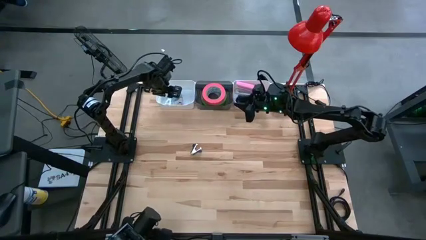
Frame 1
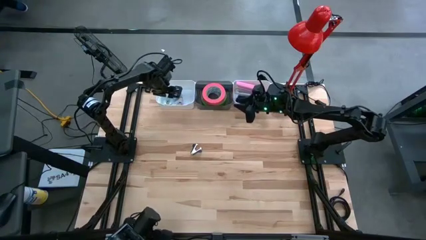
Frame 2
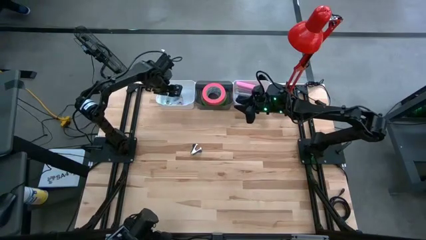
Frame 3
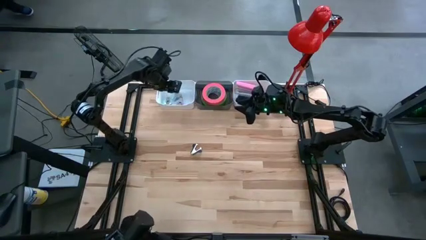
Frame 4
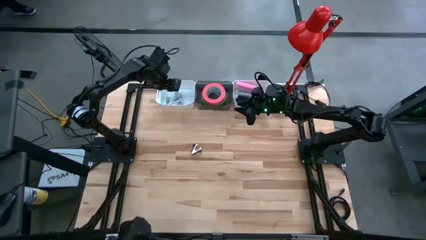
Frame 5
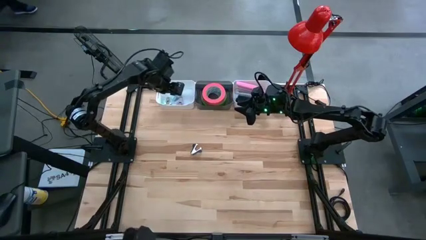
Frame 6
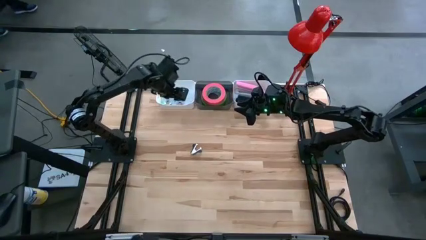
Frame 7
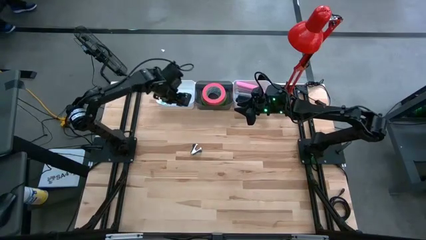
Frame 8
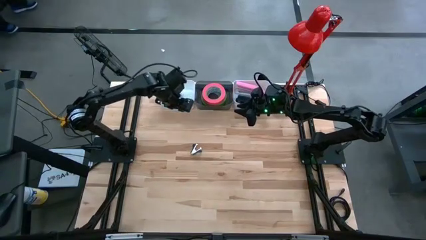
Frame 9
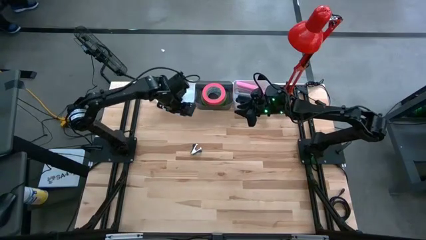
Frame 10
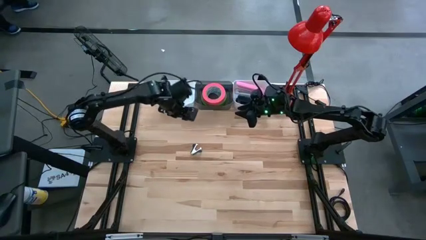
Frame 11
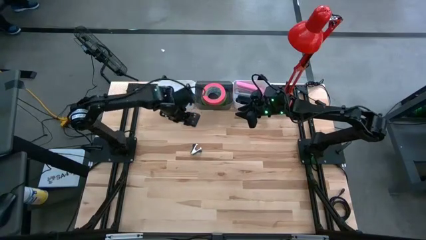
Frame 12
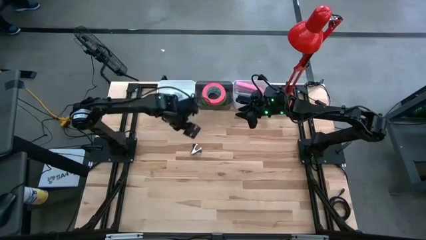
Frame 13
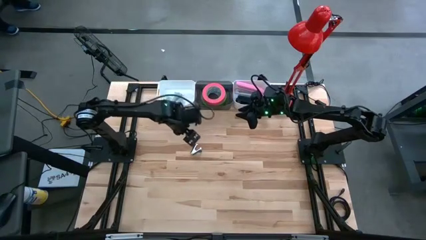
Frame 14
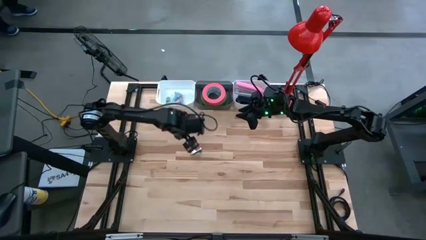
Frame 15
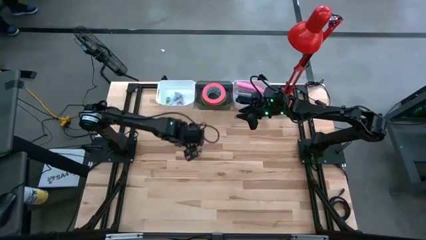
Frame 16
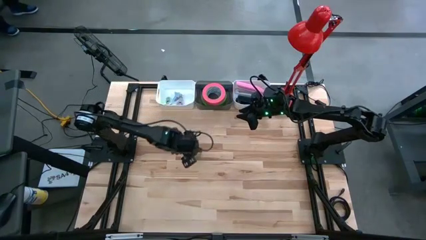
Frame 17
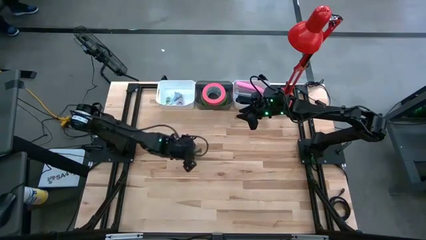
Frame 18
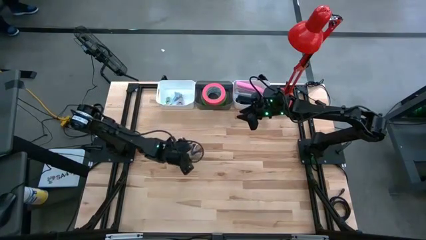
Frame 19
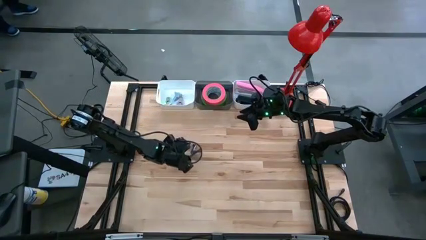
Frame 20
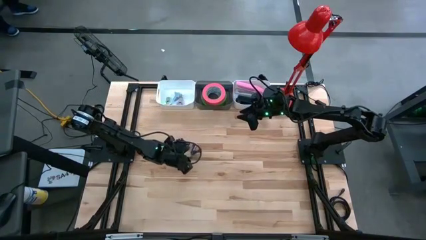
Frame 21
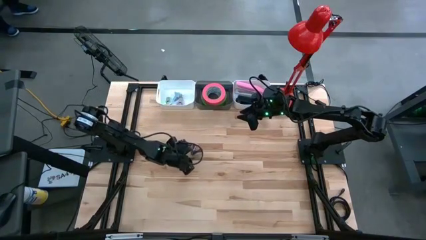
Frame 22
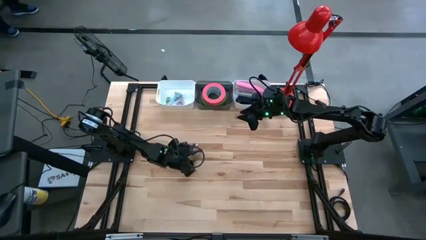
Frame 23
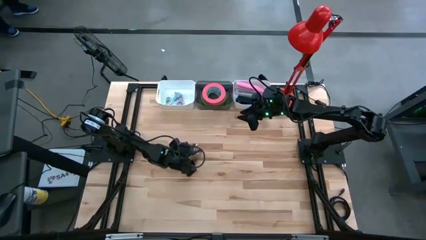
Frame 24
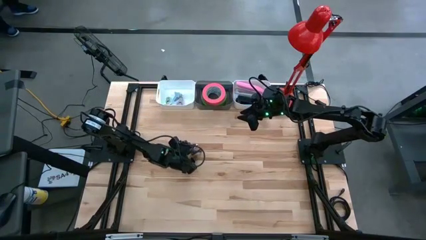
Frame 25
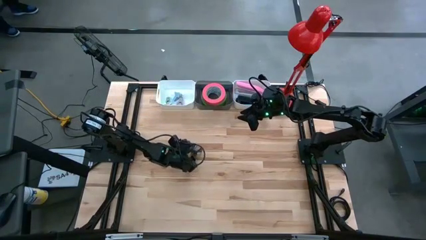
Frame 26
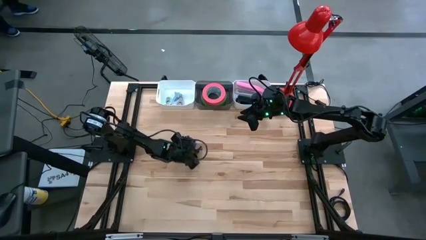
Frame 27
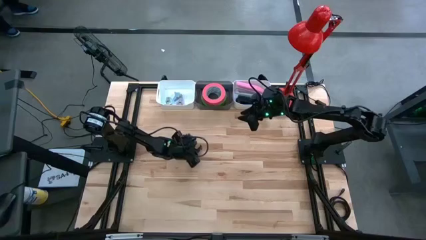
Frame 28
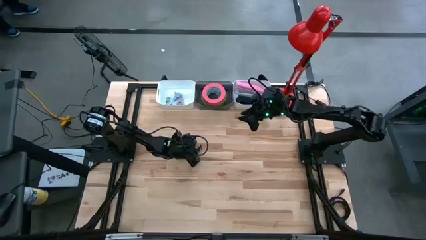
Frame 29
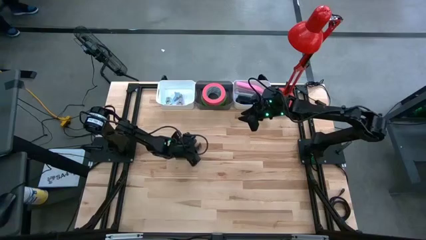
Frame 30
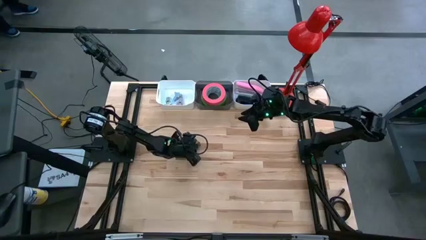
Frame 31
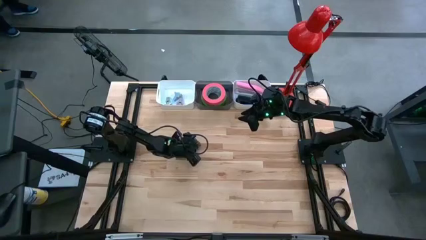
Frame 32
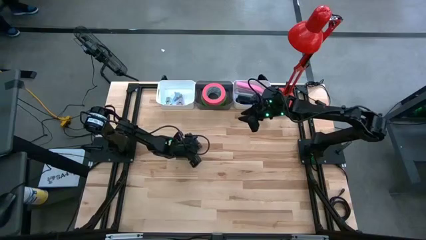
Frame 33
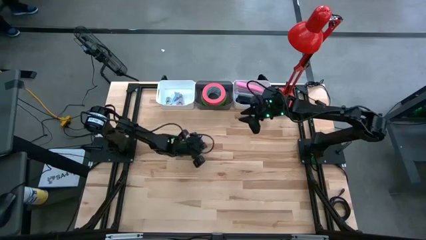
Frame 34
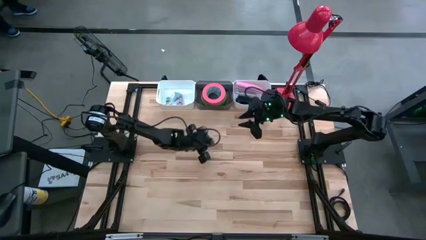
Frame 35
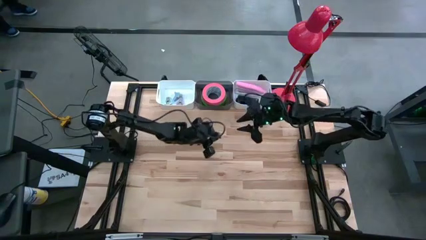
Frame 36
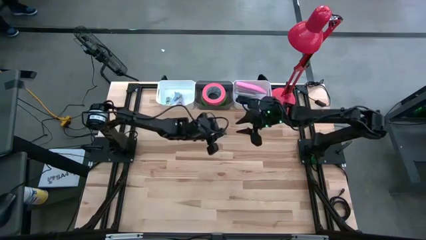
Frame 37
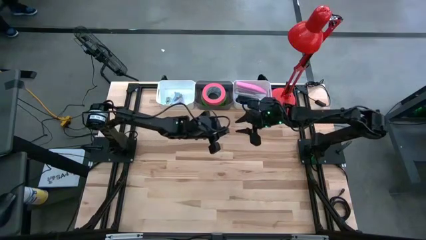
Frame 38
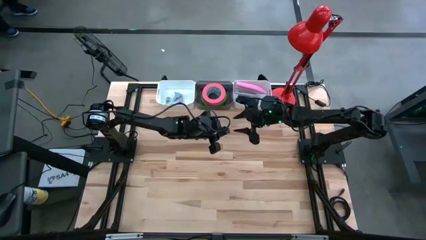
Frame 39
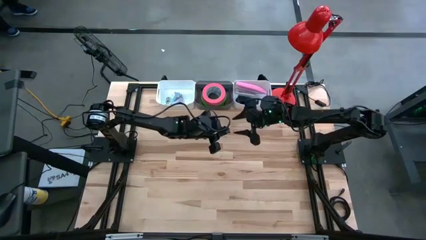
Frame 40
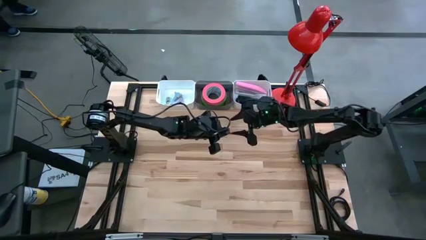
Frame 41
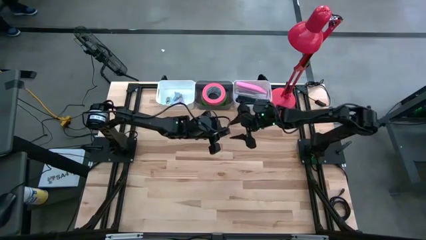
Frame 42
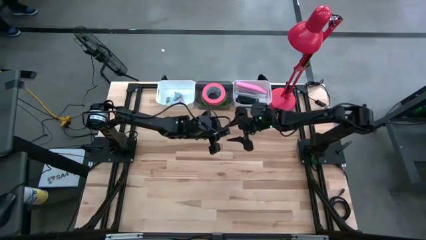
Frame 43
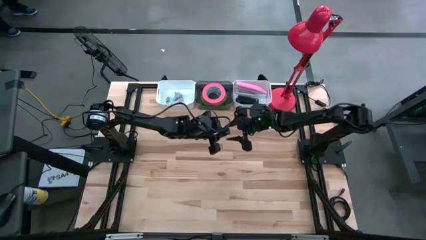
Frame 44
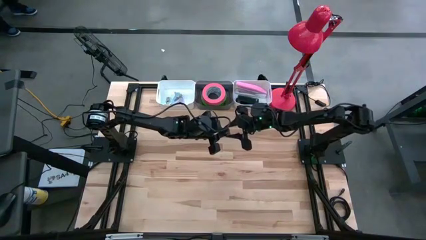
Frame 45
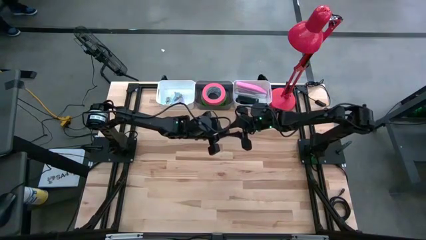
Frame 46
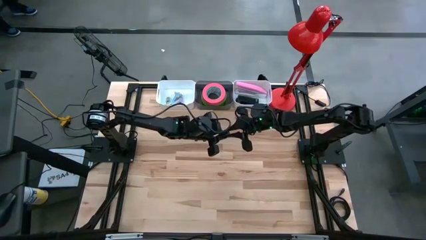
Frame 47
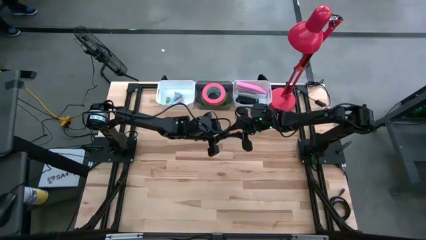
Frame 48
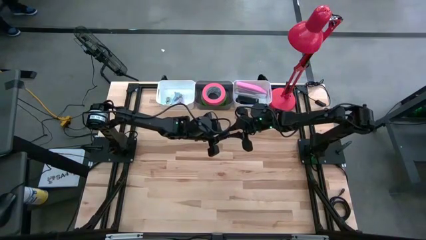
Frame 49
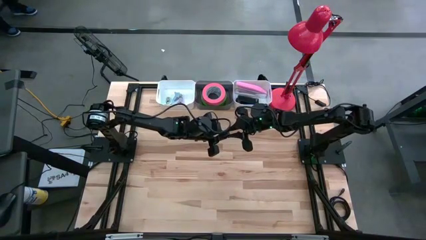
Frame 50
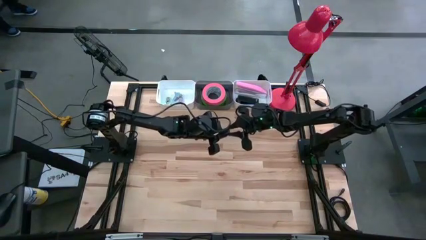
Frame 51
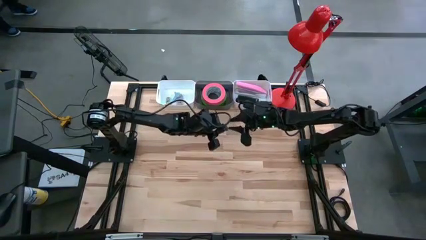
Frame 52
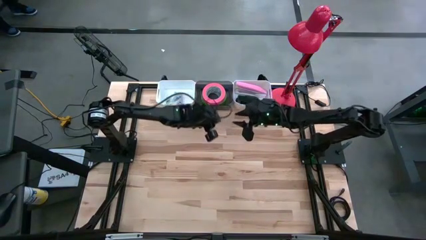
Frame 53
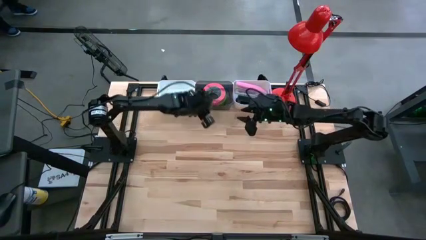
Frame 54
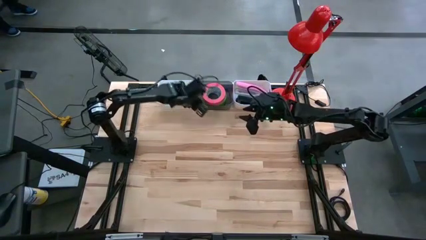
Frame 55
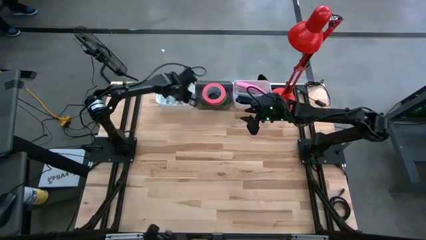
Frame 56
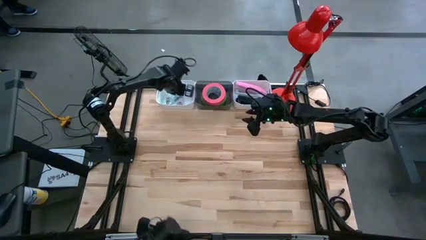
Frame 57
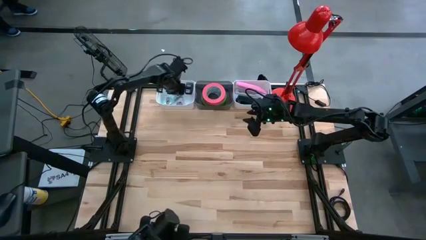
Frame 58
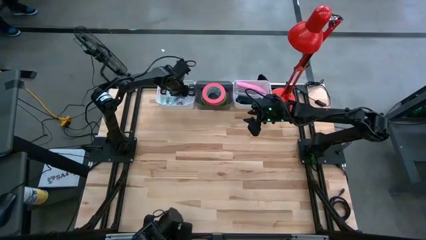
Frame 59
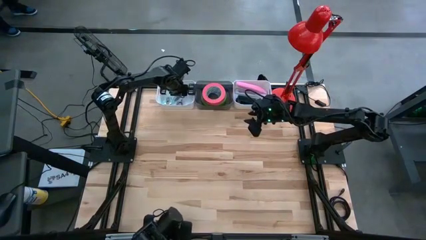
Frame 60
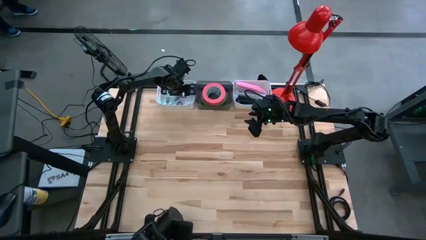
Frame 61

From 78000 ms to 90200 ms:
Task: Pick and place Stapler, Stapler remover, tape
Put the black staple remover into the left white bin
